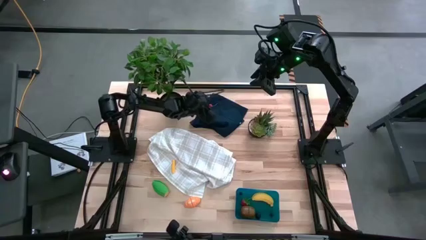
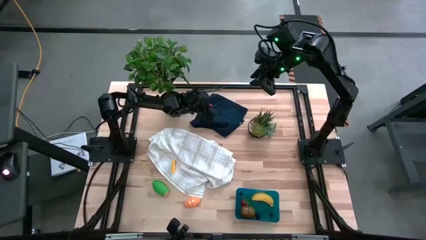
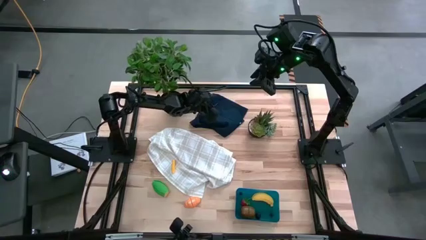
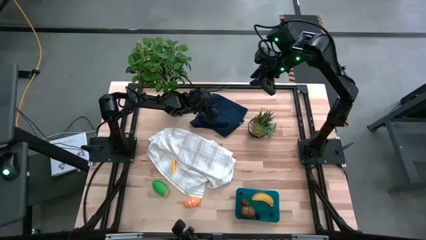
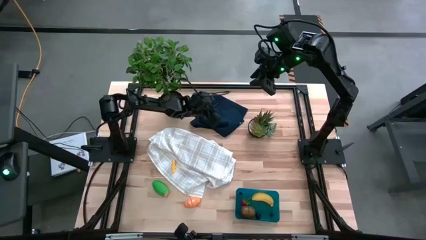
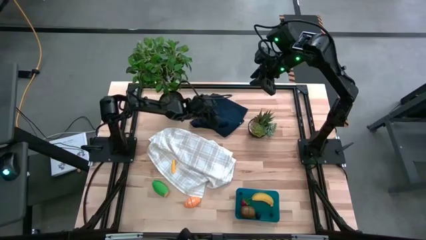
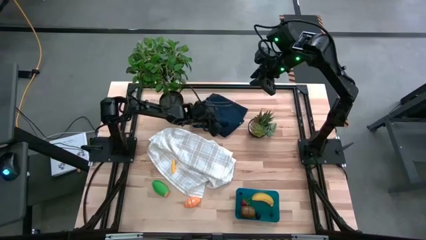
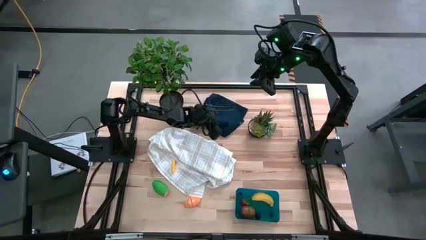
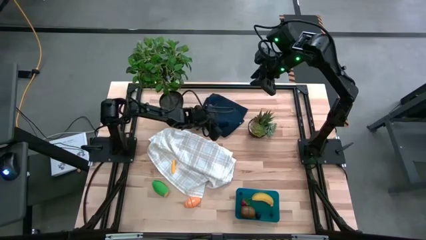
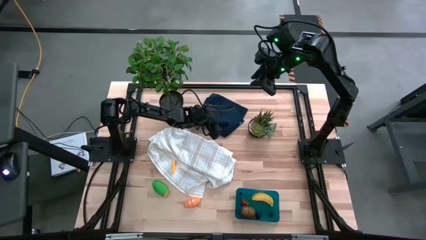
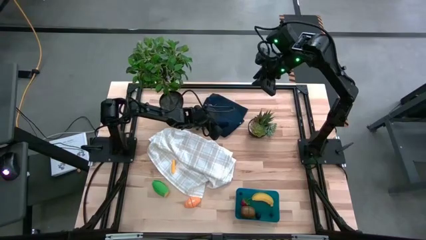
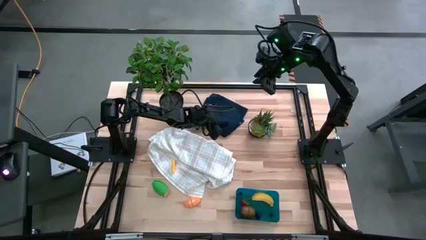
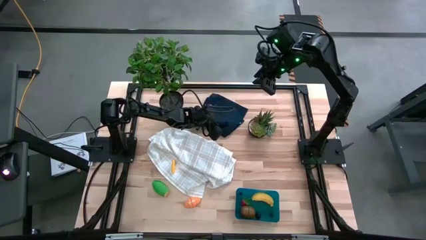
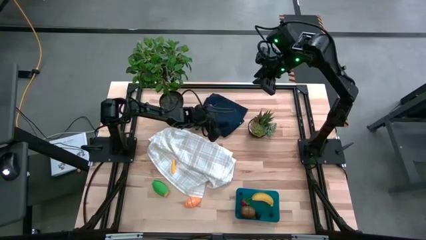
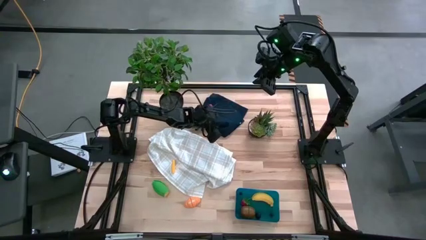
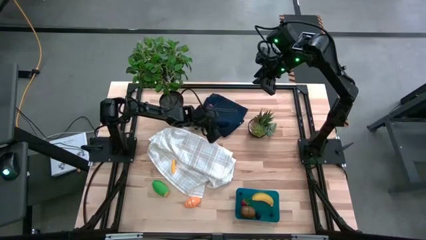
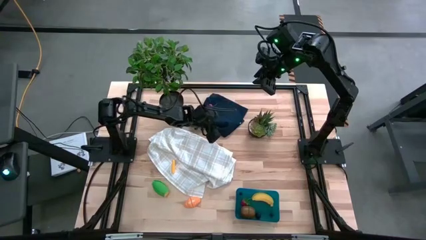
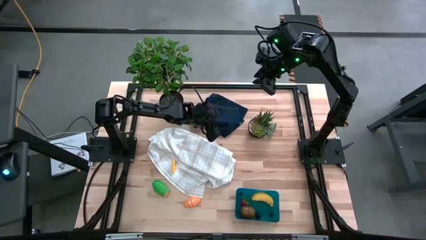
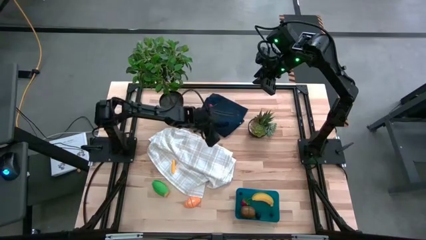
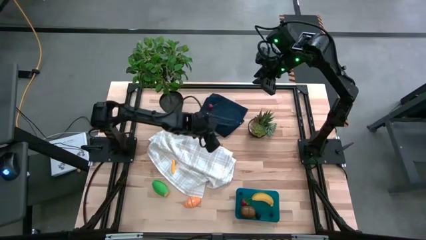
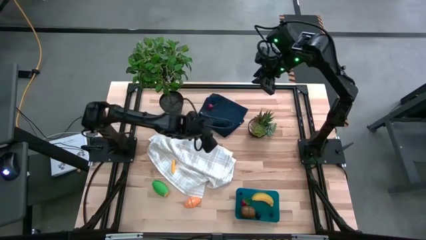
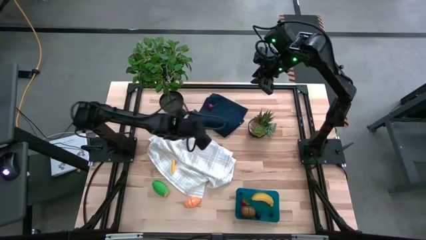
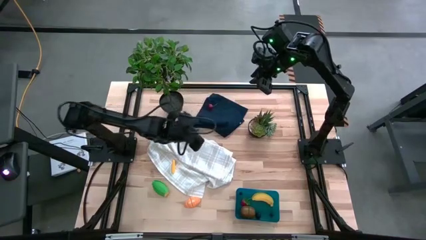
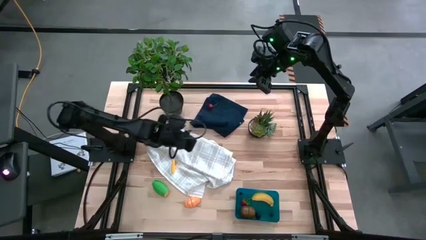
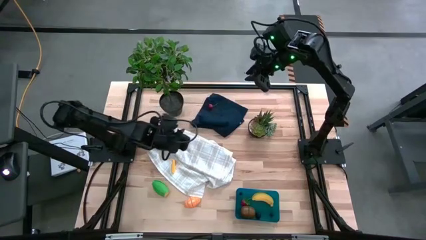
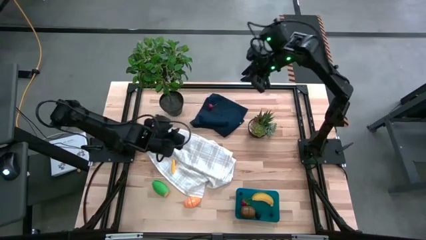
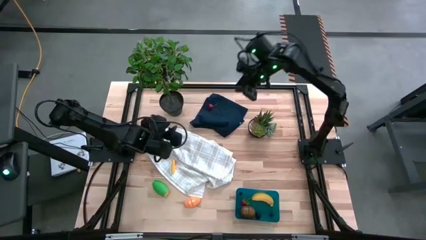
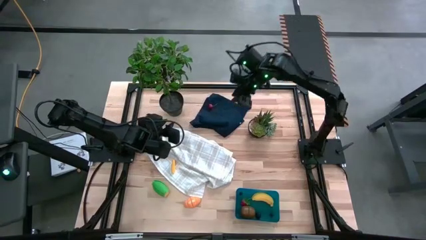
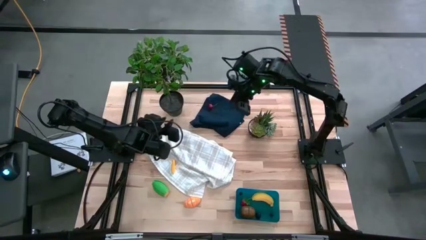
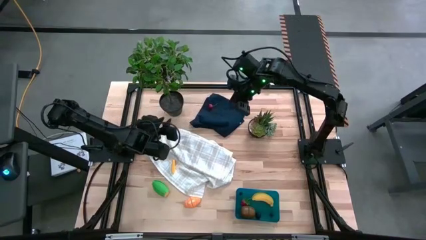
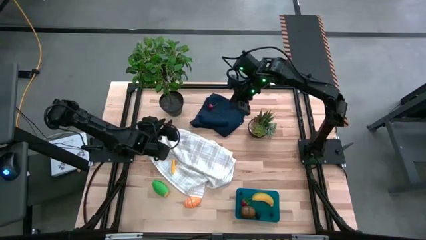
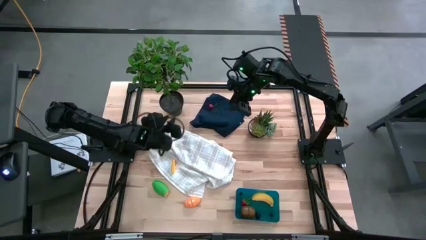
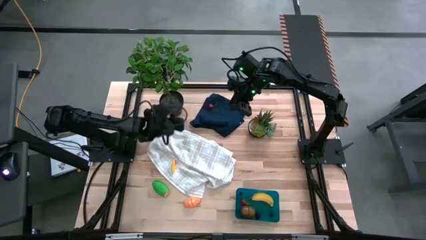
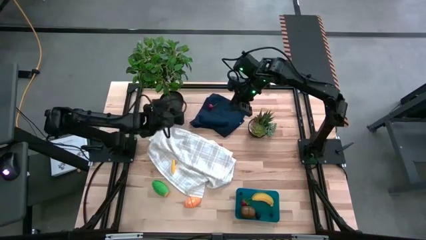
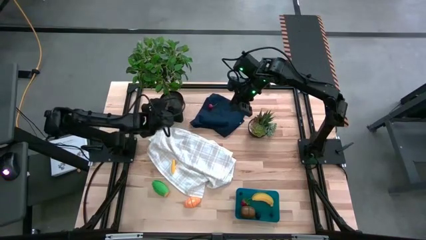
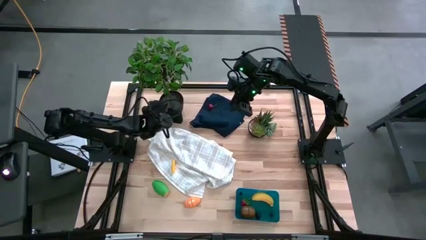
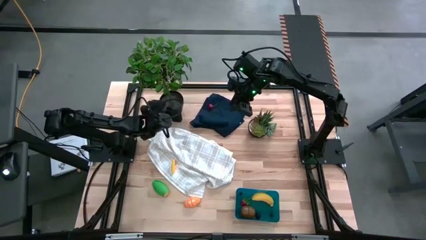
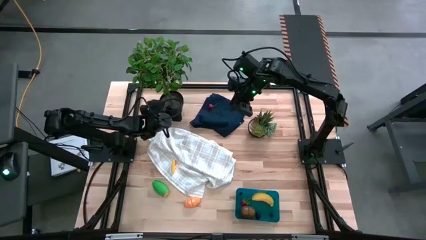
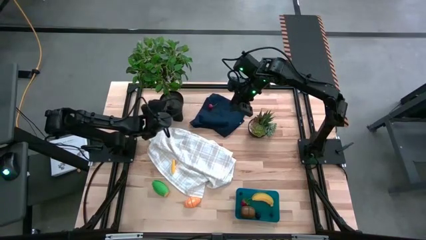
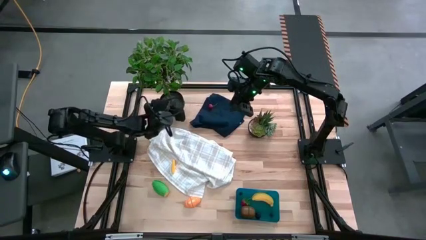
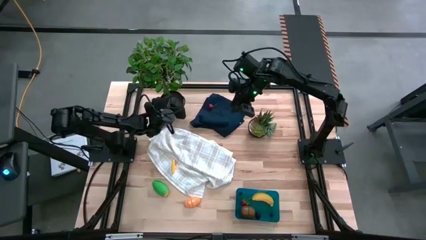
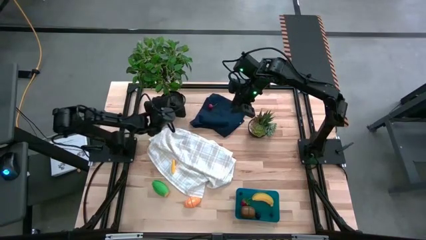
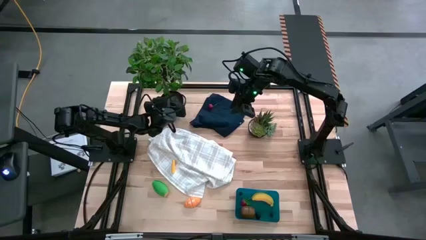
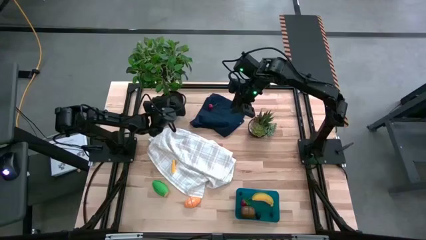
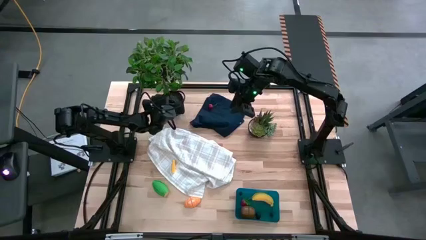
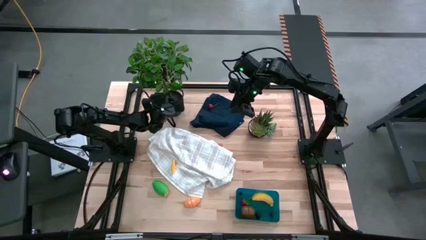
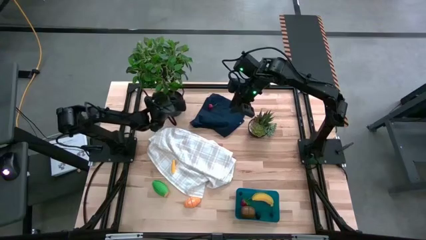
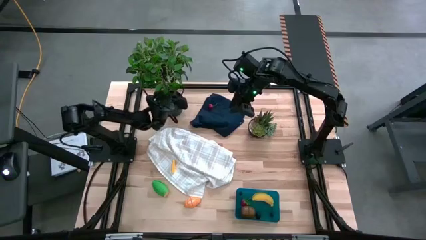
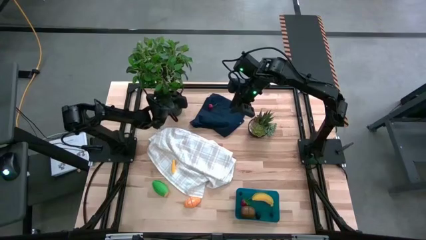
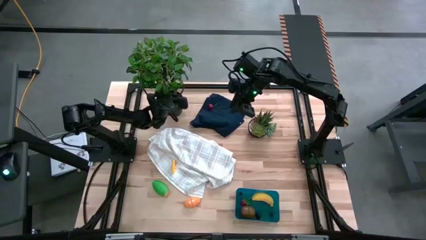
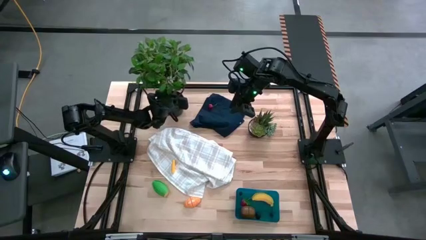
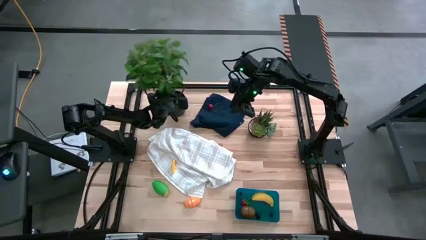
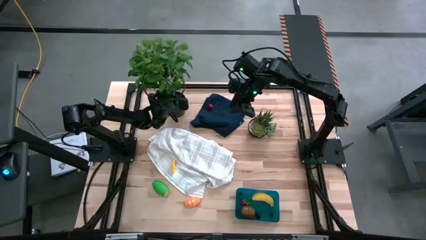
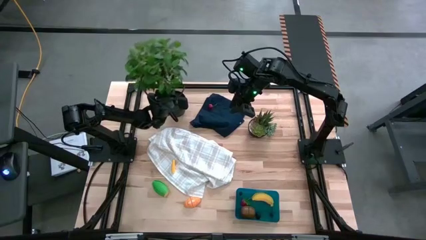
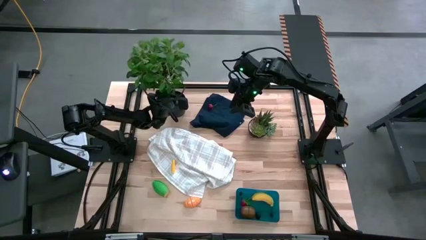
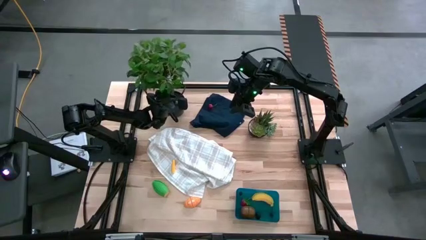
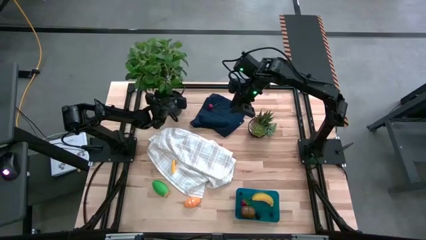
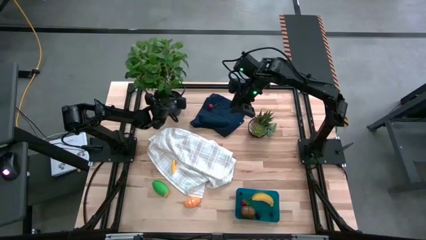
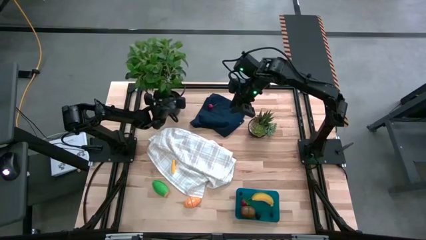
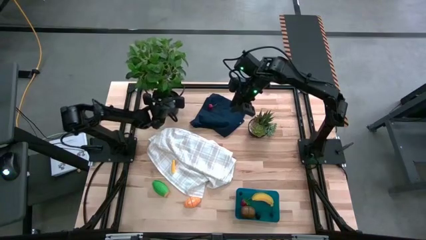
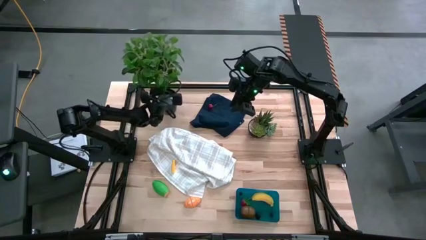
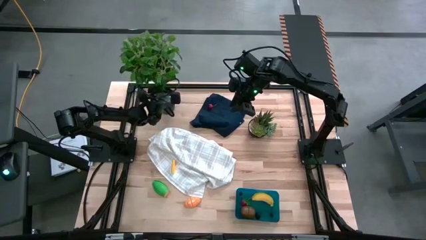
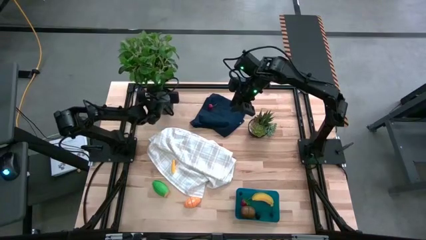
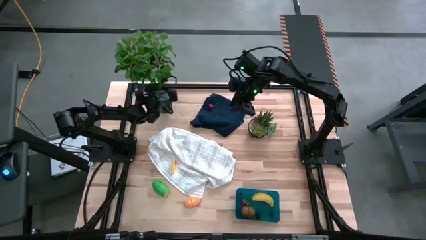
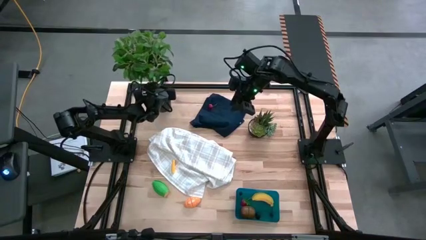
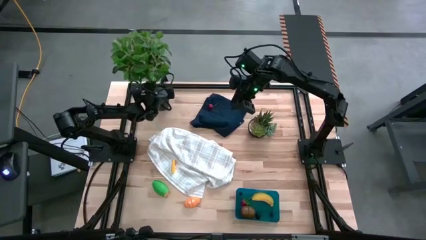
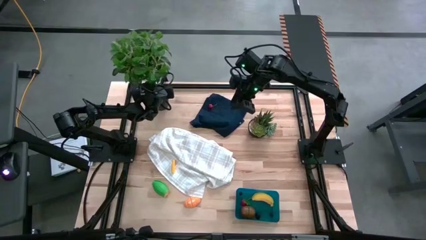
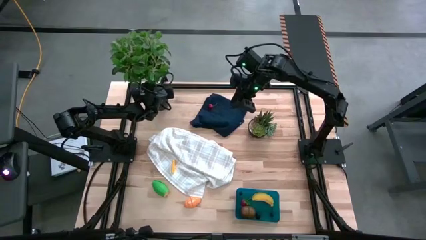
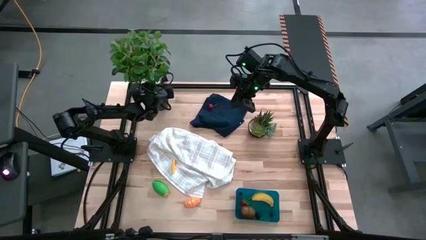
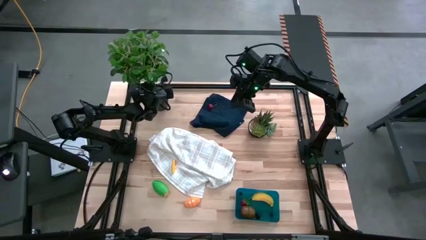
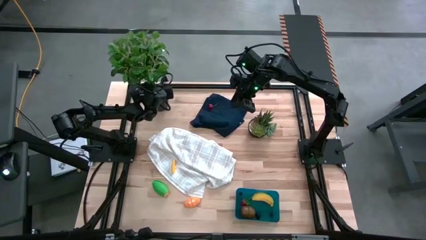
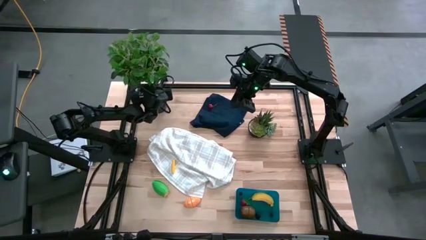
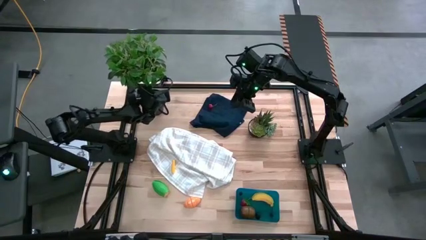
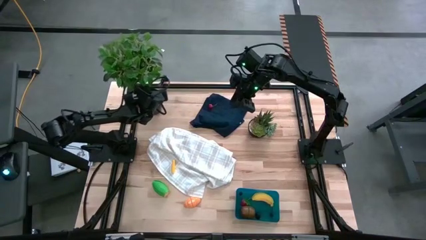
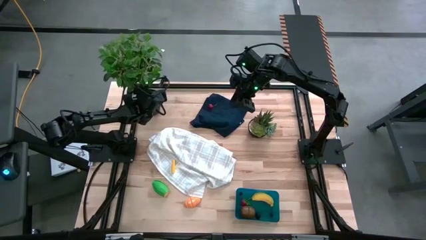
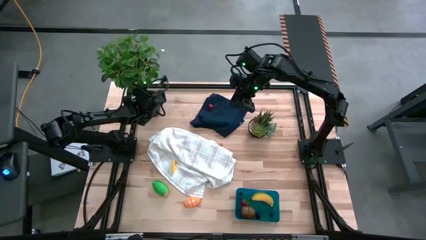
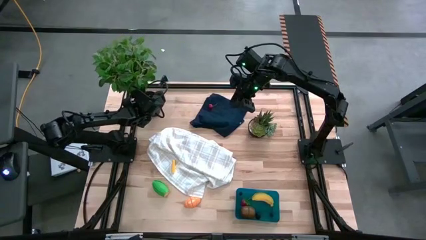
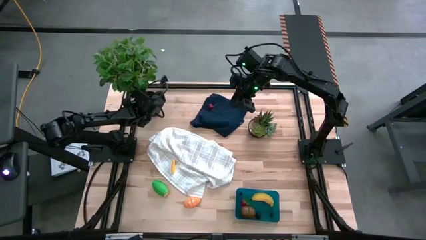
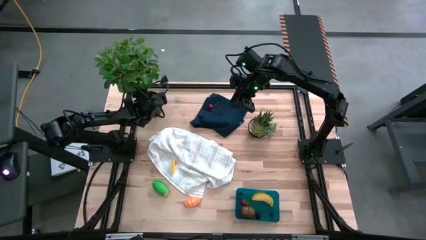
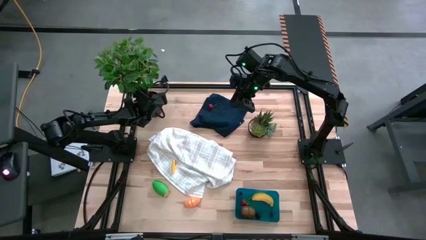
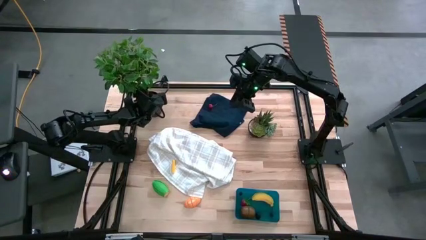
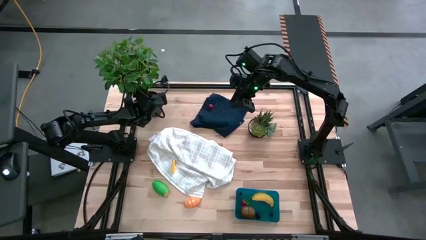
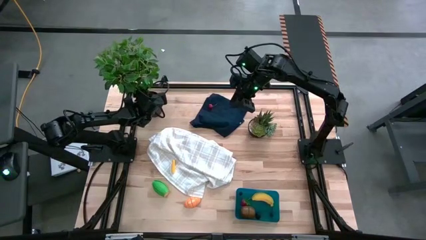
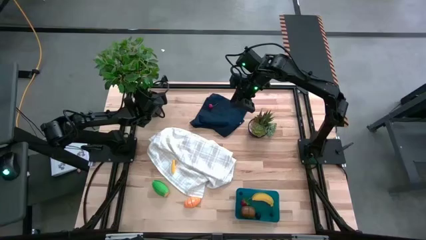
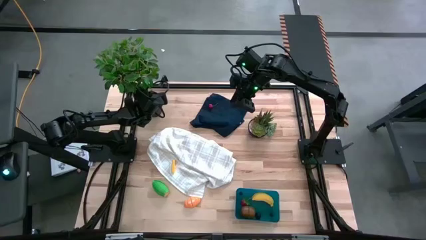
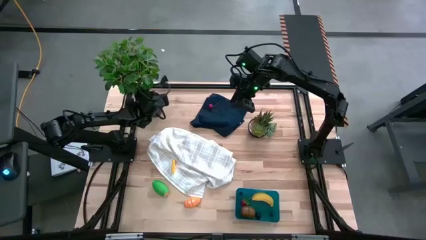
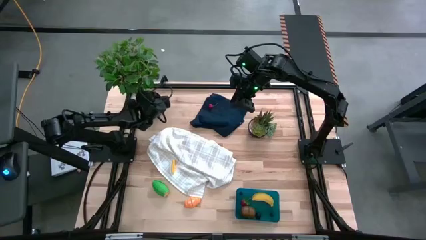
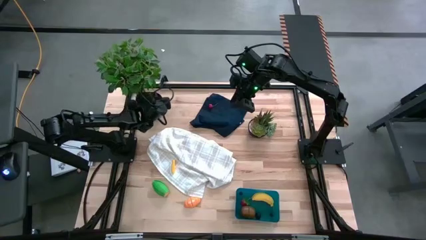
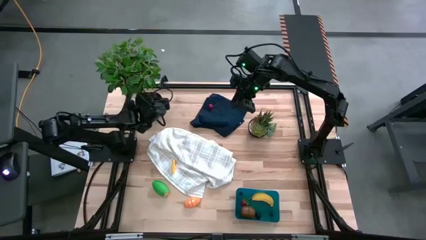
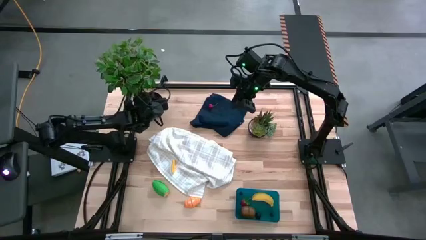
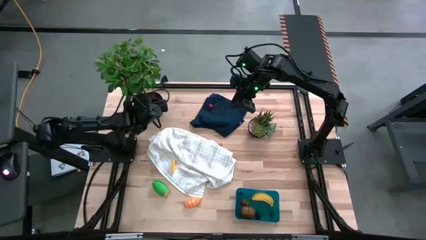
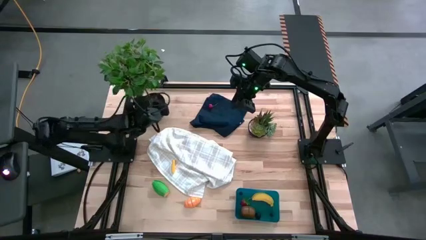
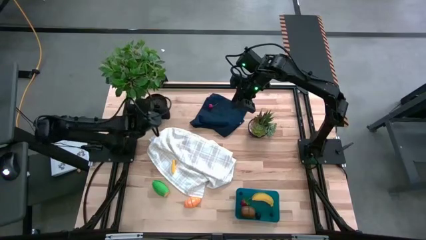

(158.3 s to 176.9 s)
Task: Pick and placing Produce into tupperware
Move the left plant pot to the top left of the table
